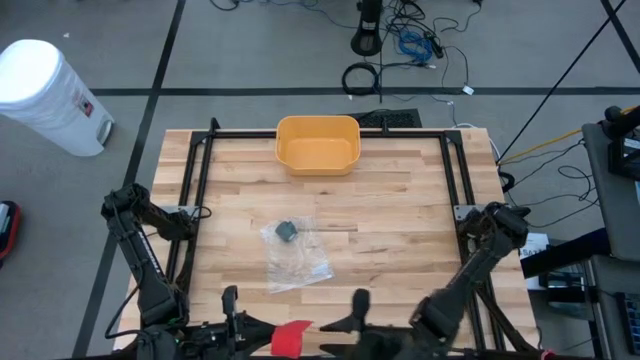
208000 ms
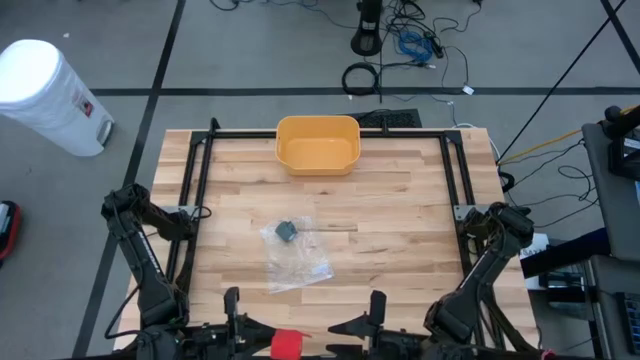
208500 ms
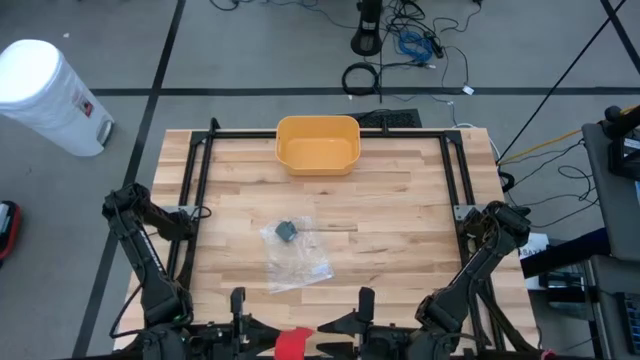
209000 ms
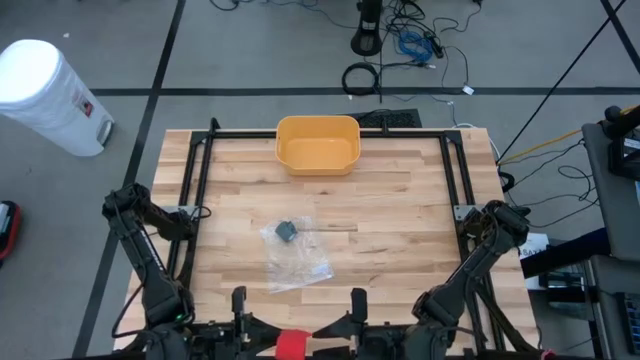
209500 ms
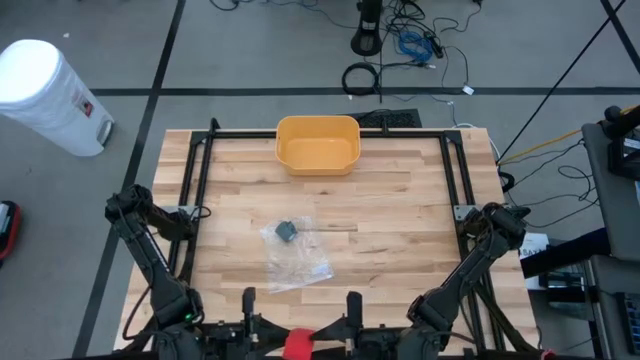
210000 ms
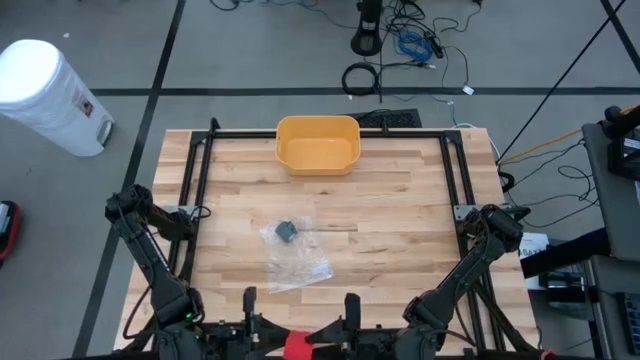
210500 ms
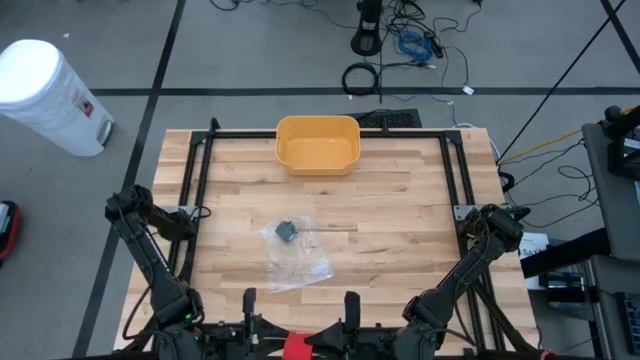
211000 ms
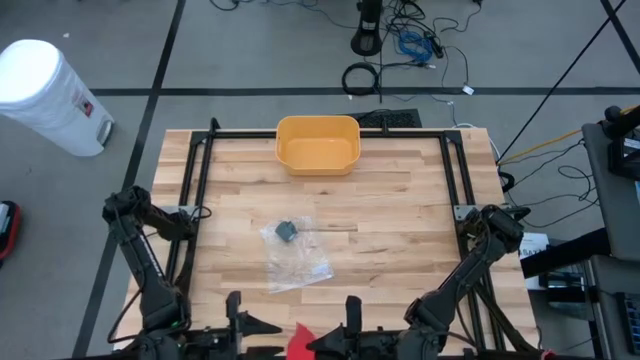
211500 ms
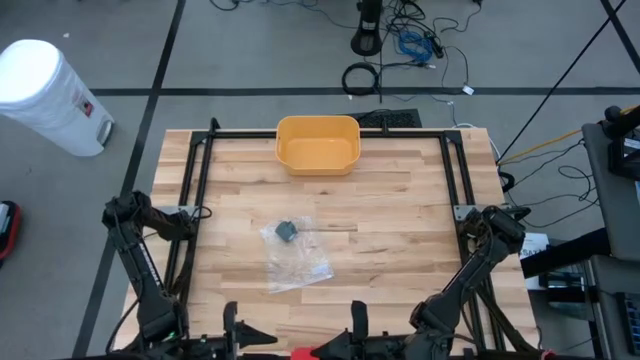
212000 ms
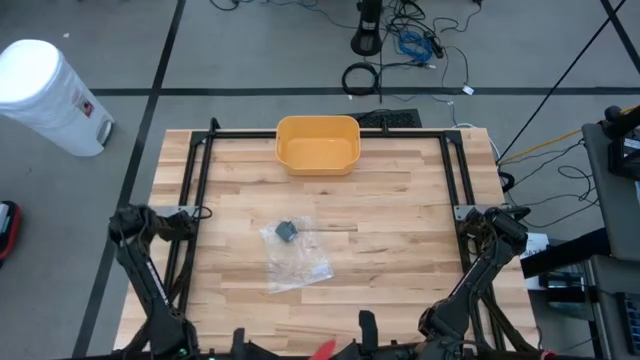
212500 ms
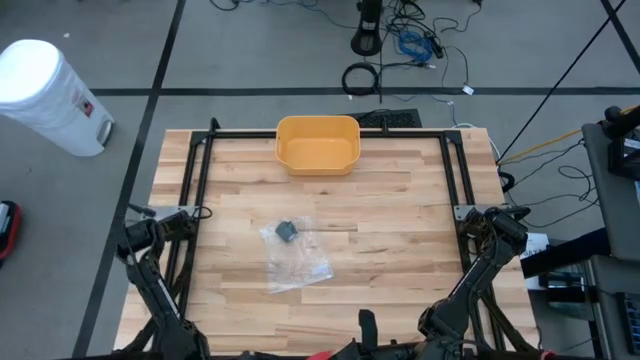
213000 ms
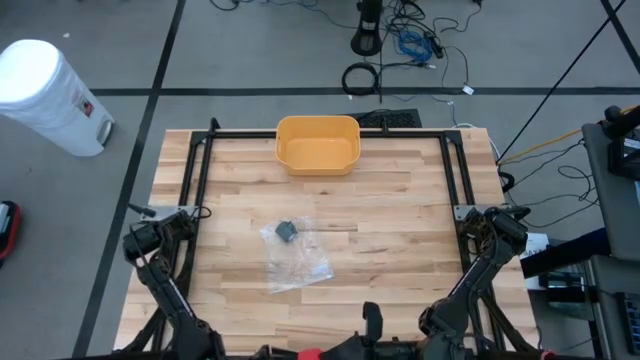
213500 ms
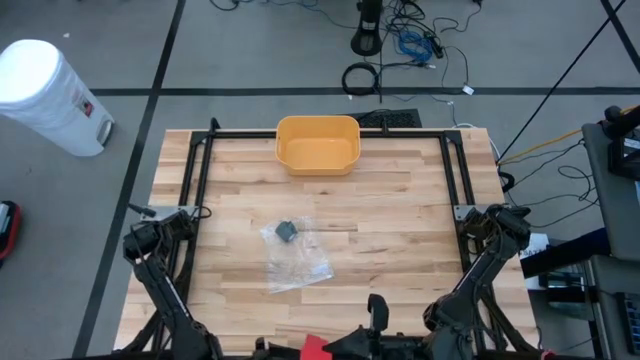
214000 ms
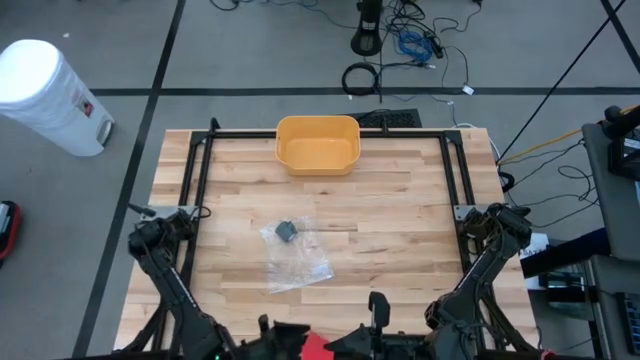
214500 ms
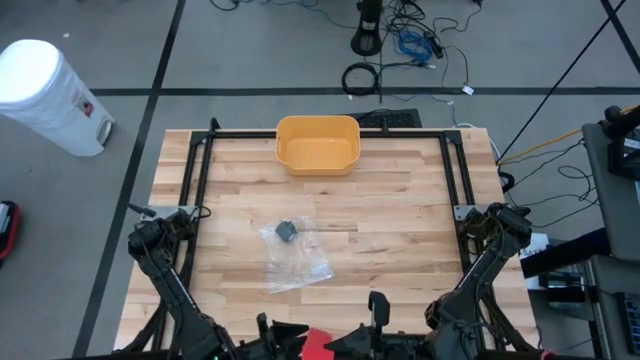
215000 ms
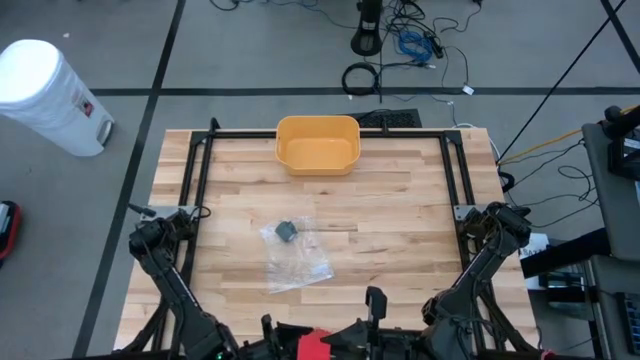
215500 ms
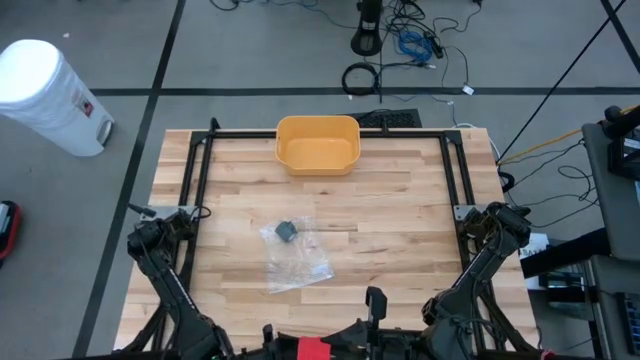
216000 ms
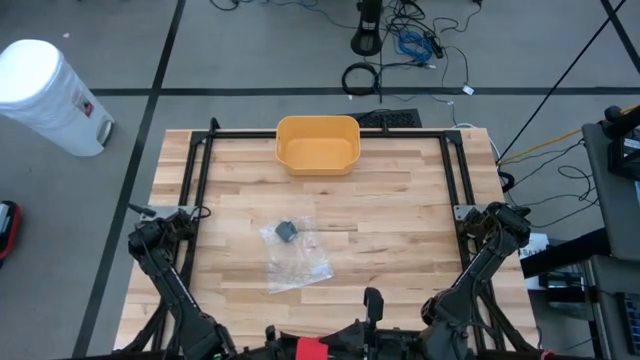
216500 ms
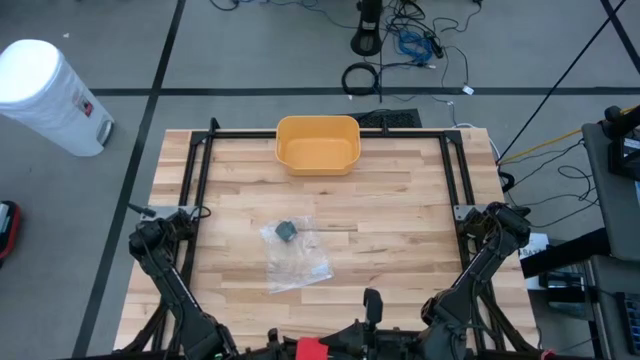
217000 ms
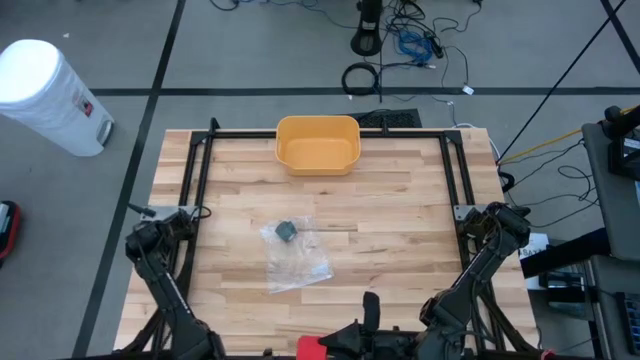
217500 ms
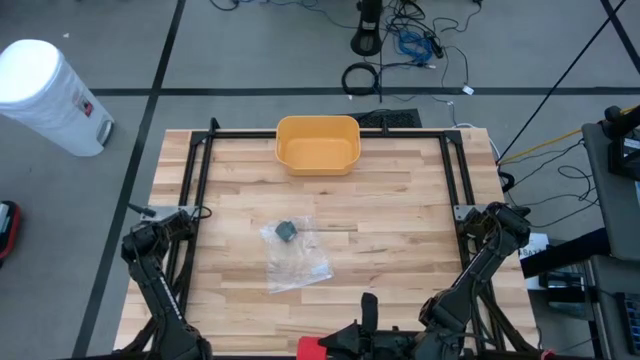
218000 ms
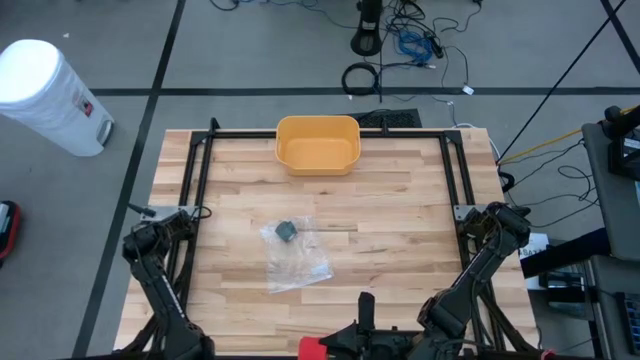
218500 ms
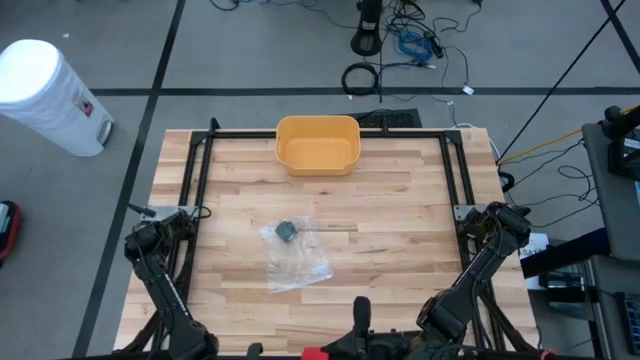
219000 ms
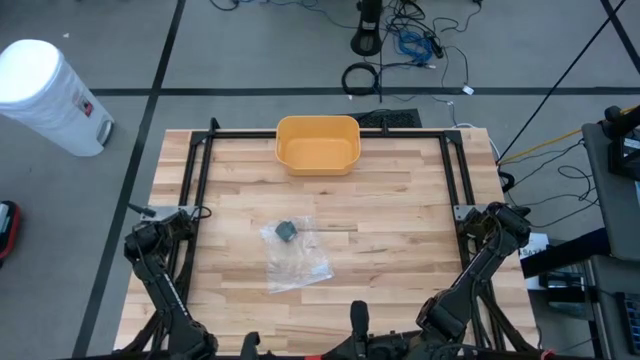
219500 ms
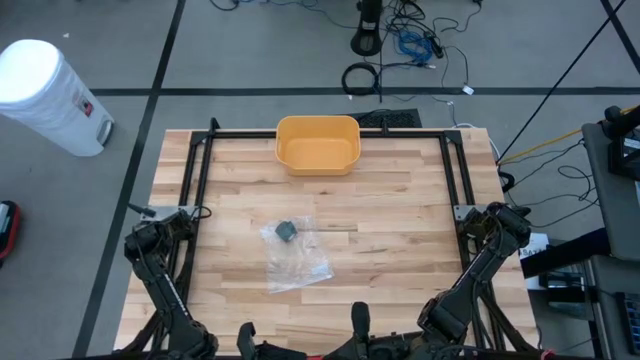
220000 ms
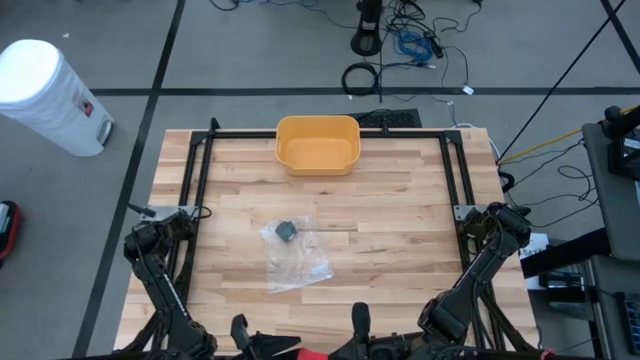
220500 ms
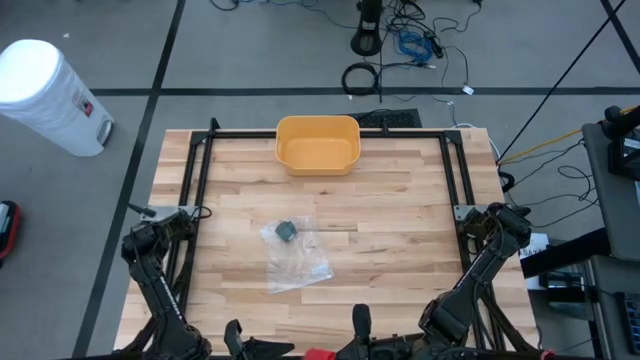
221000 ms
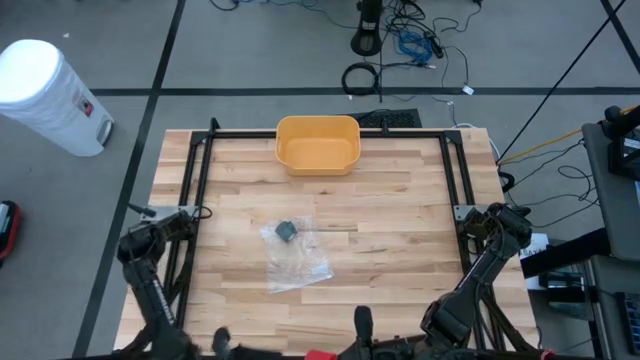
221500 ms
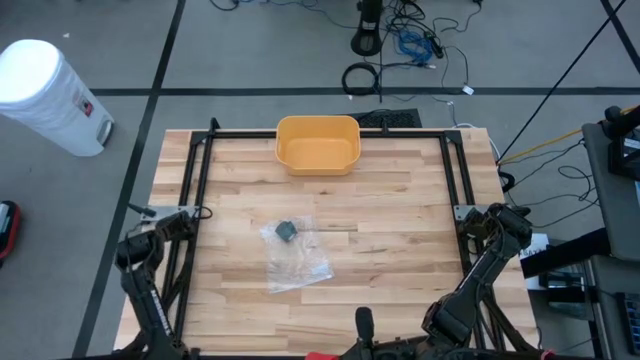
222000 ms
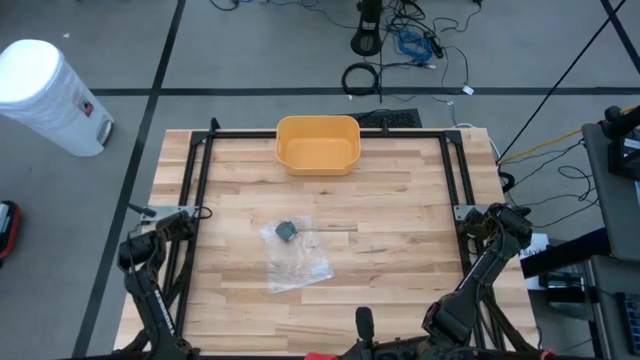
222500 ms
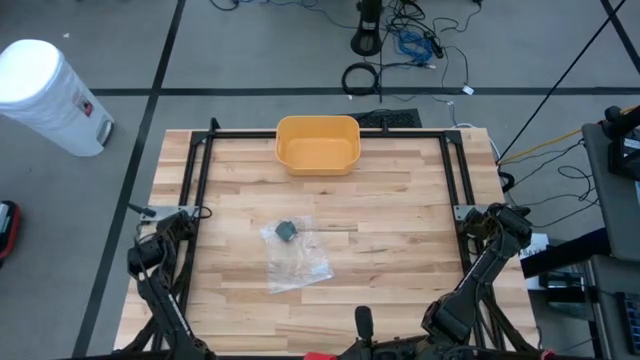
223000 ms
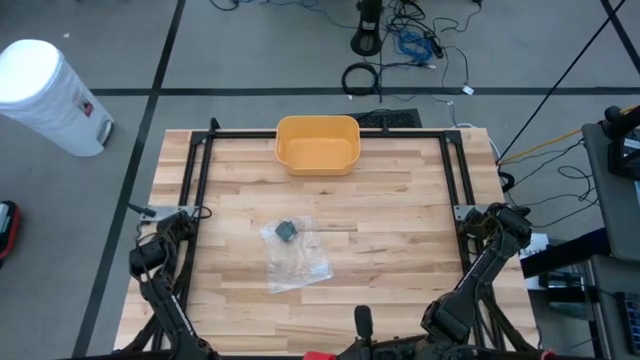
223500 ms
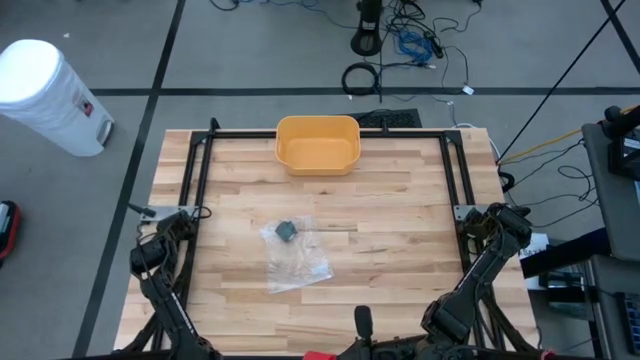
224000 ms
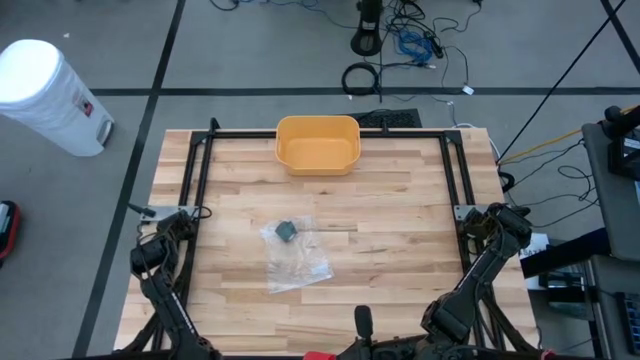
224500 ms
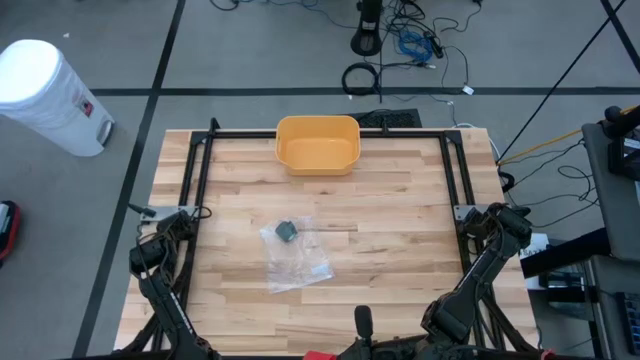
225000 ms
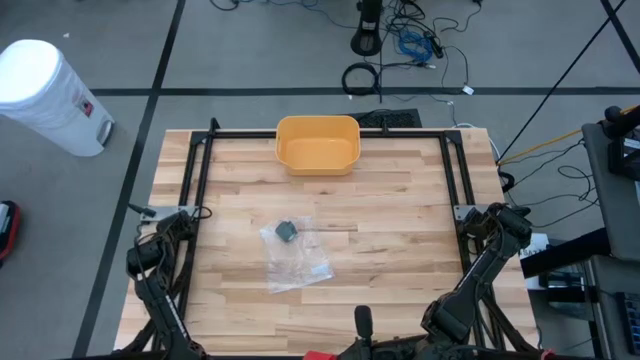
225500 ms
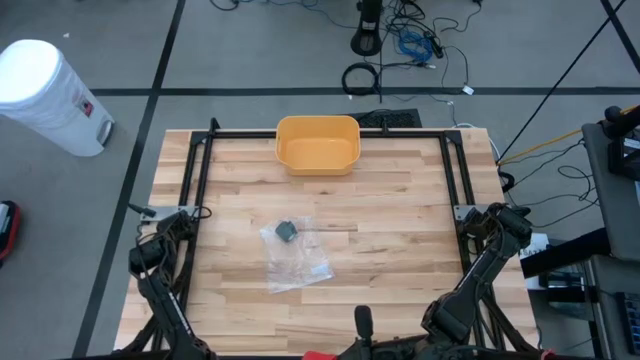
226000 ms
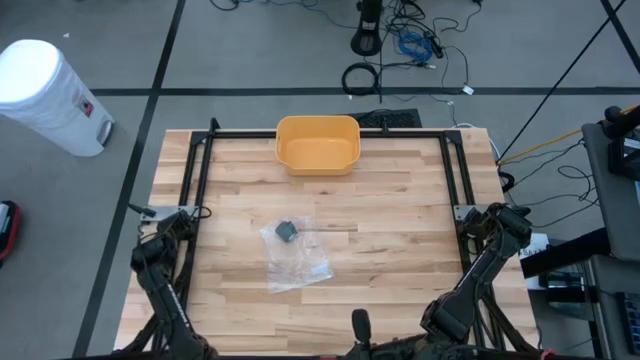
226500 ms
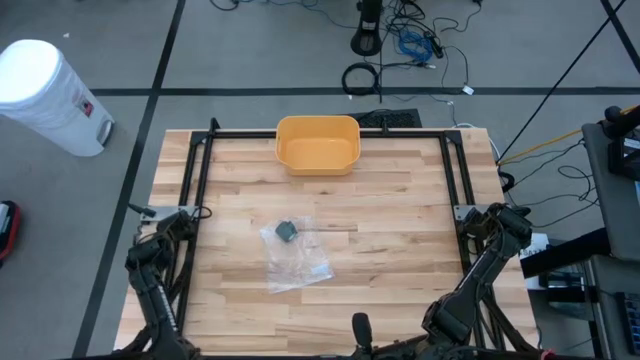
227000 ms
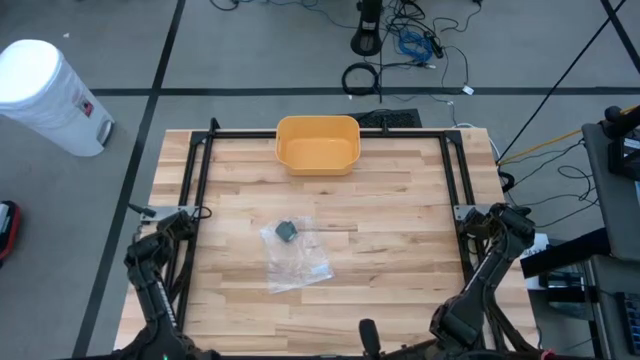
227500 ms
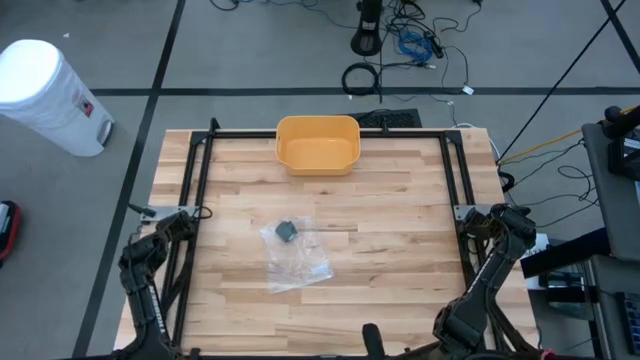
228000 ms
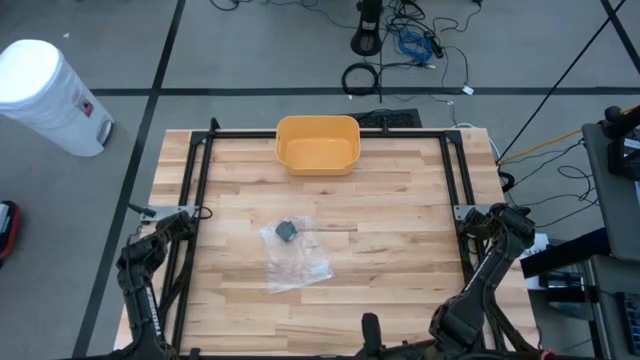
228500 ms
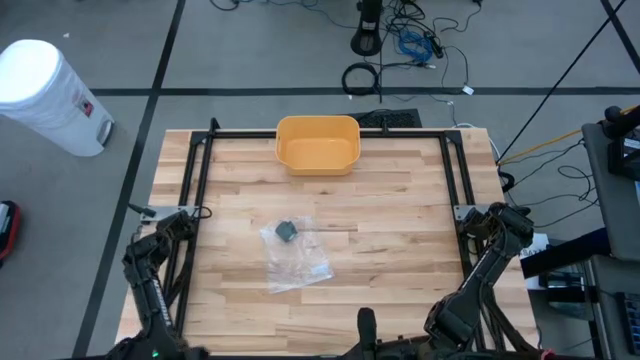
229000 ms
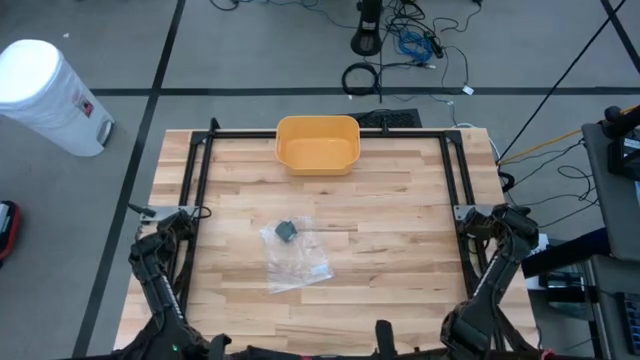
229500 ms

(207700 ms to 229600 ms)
Task: Roll bandage
Roll the red bandage
